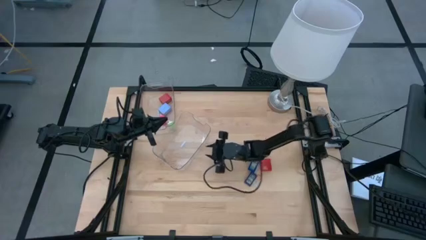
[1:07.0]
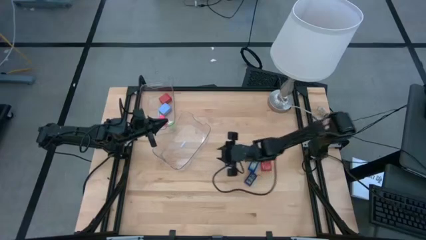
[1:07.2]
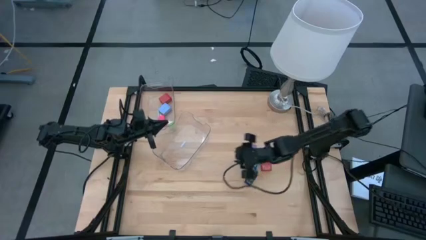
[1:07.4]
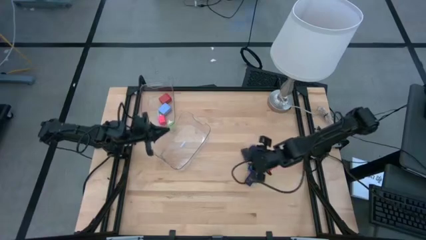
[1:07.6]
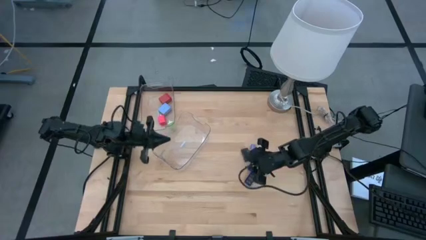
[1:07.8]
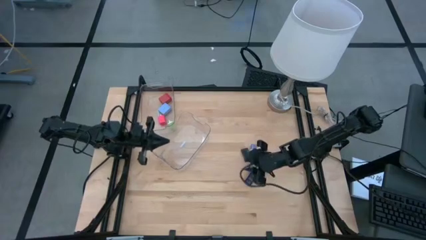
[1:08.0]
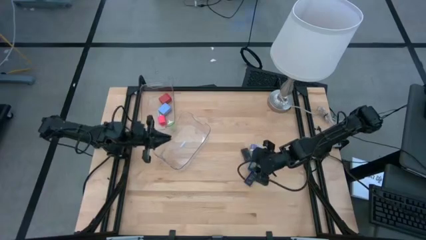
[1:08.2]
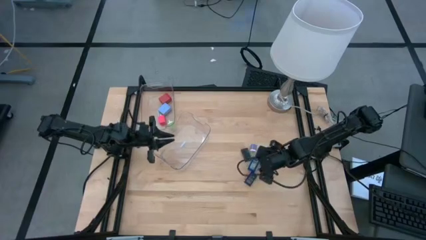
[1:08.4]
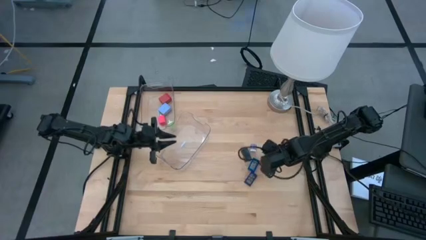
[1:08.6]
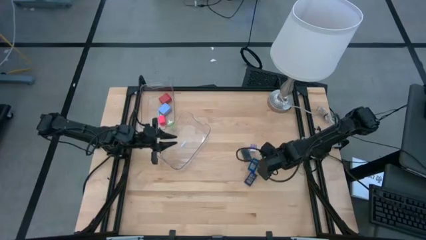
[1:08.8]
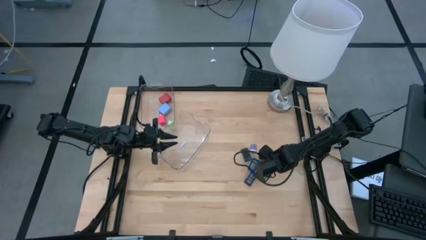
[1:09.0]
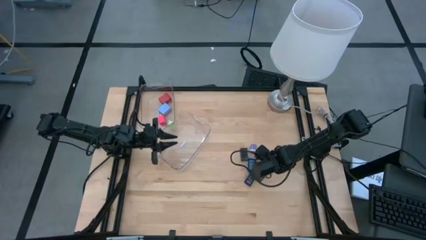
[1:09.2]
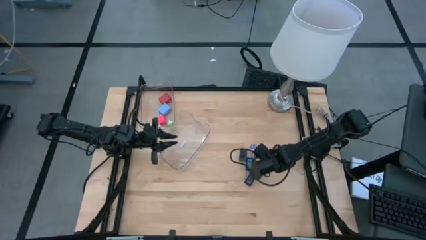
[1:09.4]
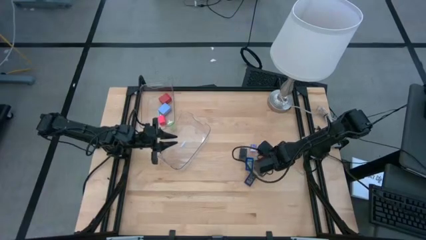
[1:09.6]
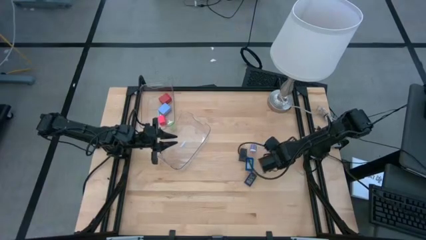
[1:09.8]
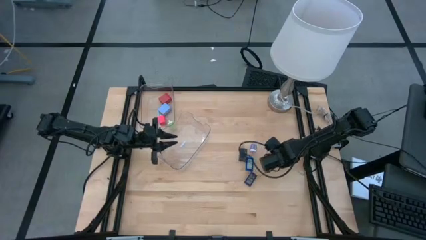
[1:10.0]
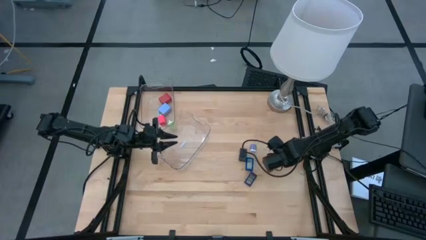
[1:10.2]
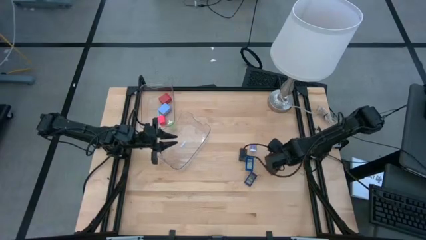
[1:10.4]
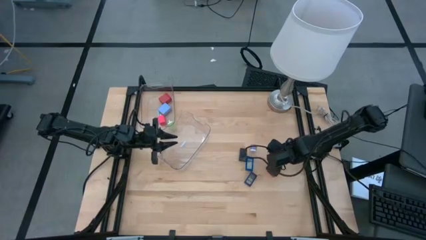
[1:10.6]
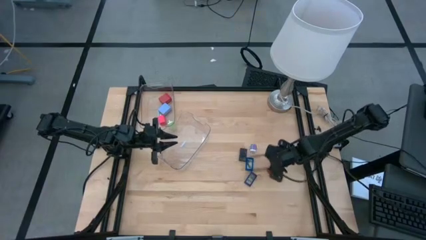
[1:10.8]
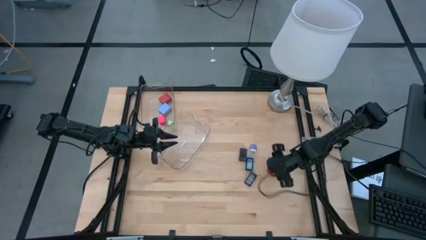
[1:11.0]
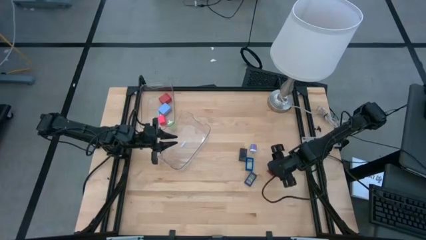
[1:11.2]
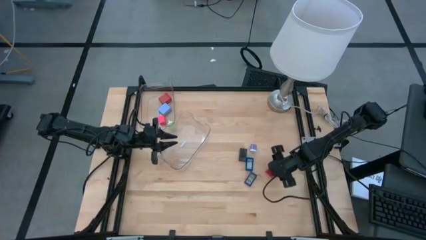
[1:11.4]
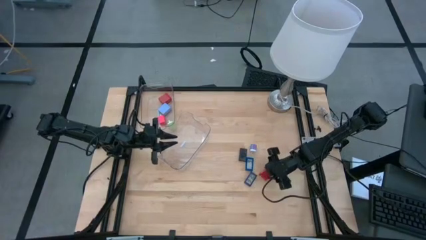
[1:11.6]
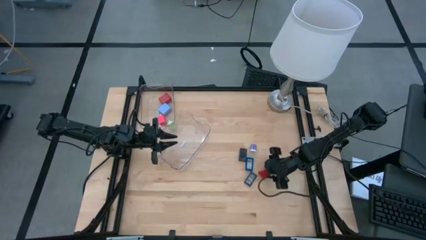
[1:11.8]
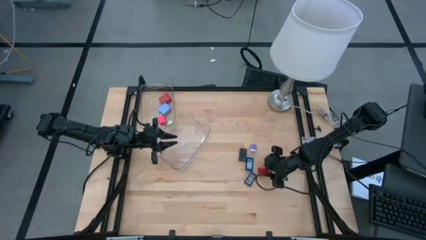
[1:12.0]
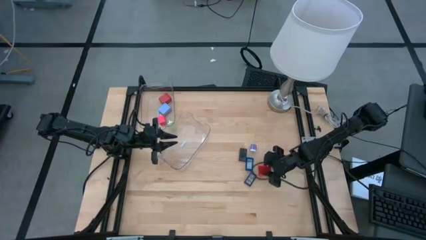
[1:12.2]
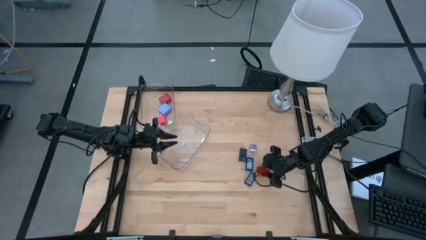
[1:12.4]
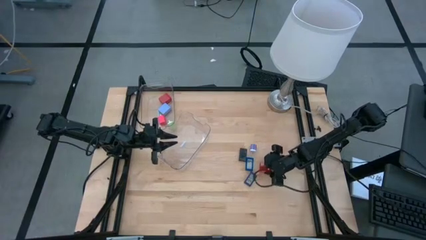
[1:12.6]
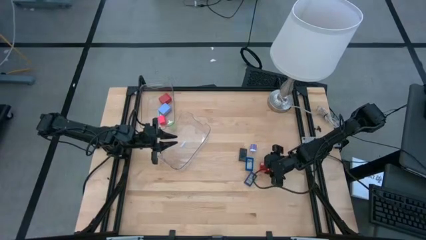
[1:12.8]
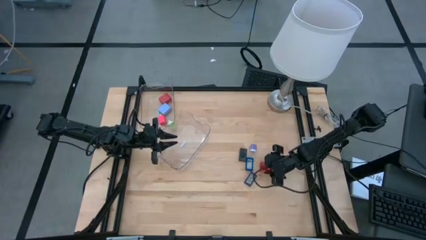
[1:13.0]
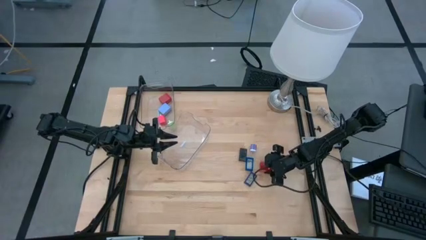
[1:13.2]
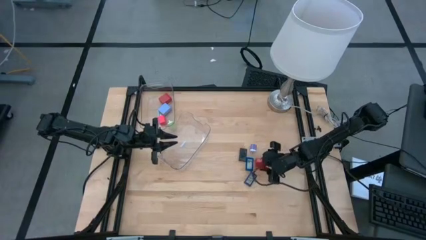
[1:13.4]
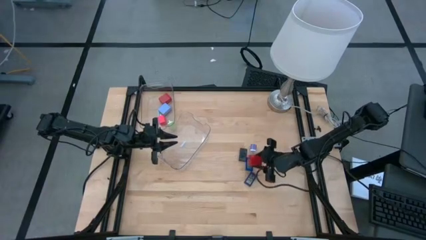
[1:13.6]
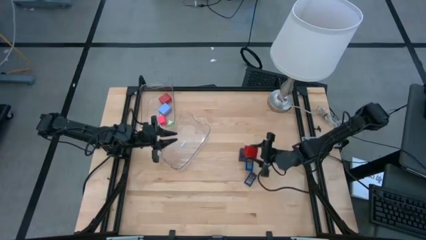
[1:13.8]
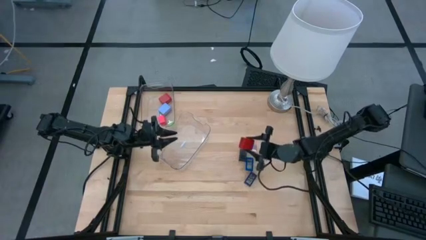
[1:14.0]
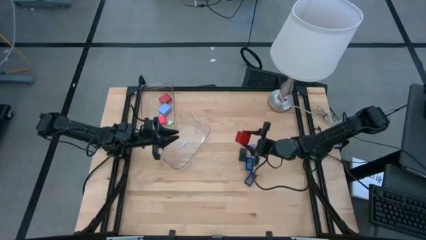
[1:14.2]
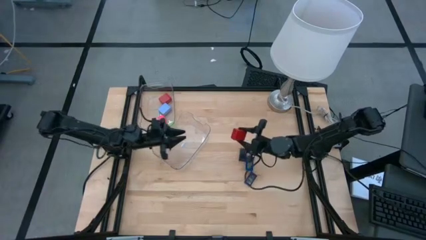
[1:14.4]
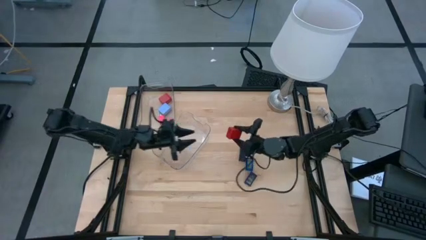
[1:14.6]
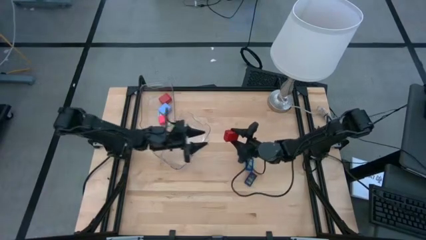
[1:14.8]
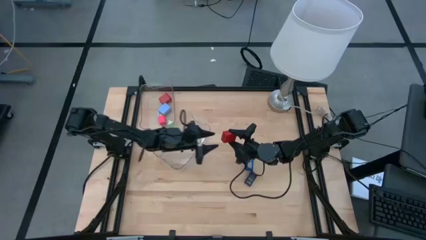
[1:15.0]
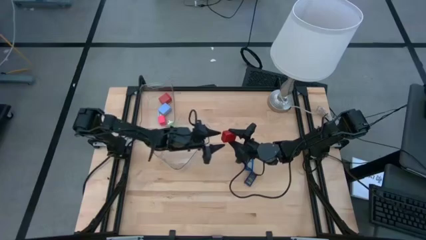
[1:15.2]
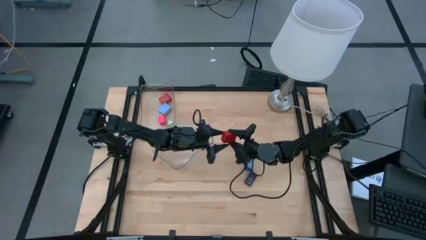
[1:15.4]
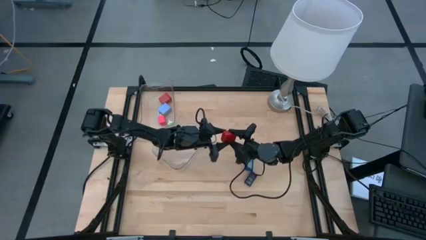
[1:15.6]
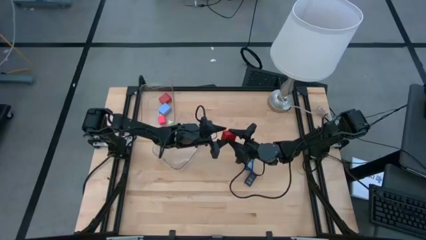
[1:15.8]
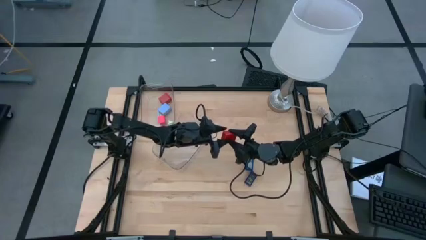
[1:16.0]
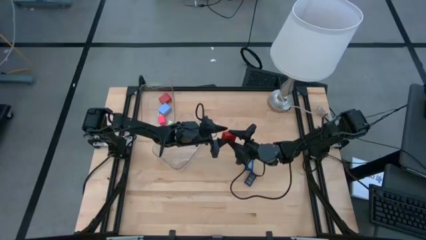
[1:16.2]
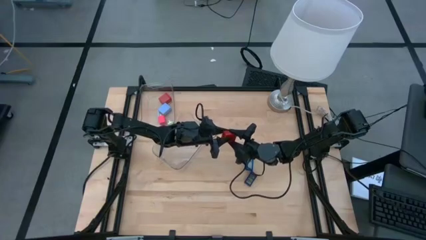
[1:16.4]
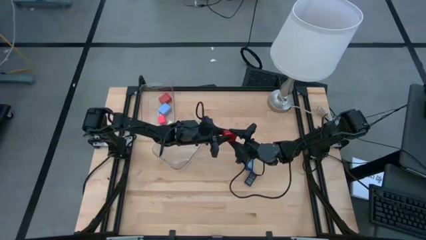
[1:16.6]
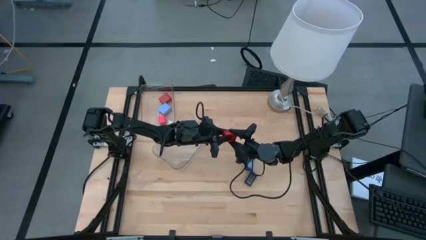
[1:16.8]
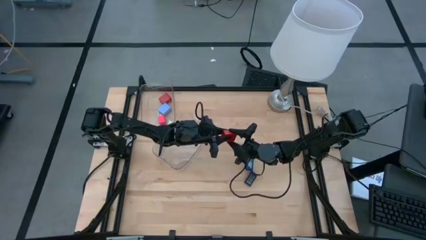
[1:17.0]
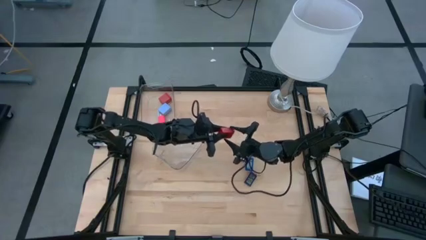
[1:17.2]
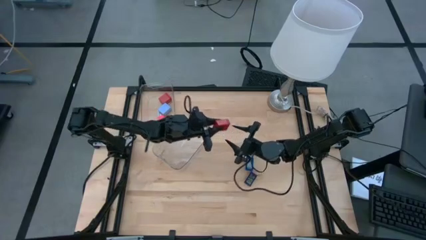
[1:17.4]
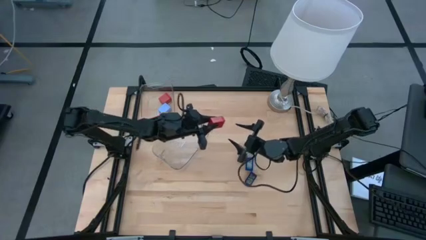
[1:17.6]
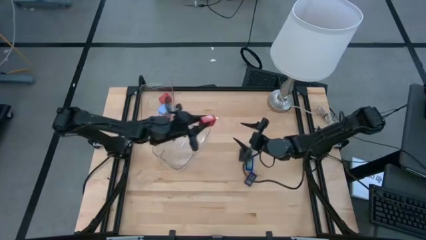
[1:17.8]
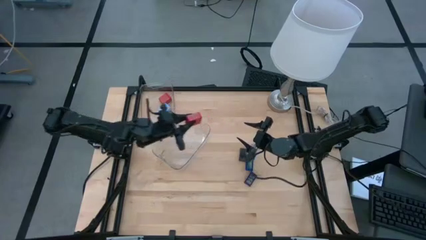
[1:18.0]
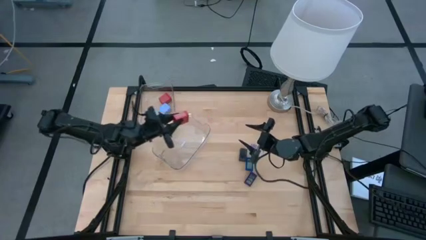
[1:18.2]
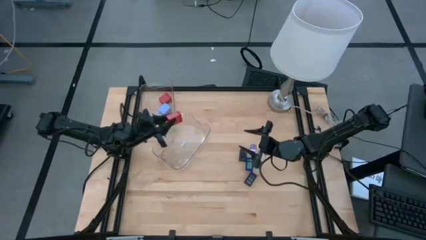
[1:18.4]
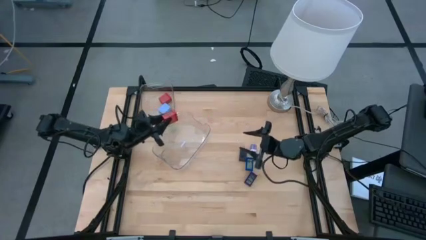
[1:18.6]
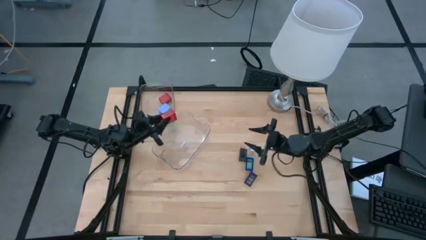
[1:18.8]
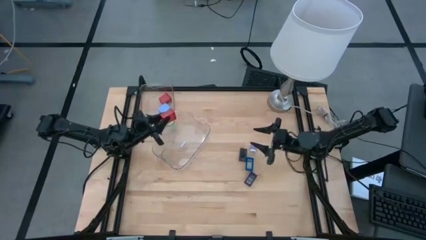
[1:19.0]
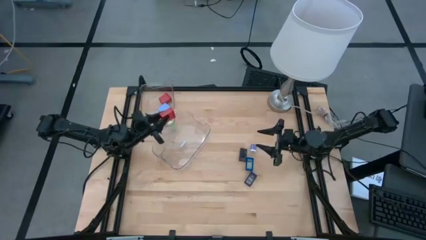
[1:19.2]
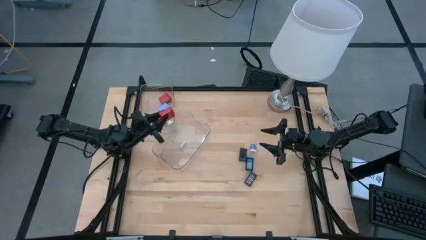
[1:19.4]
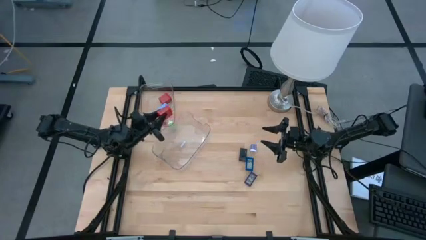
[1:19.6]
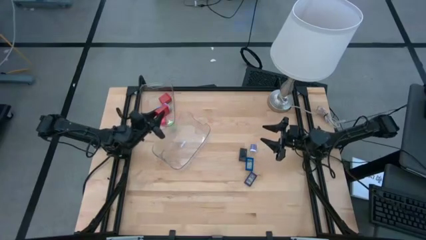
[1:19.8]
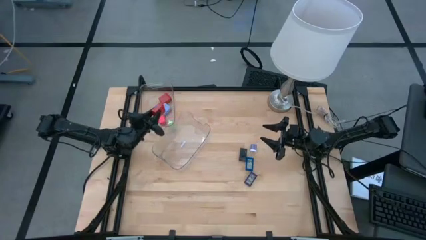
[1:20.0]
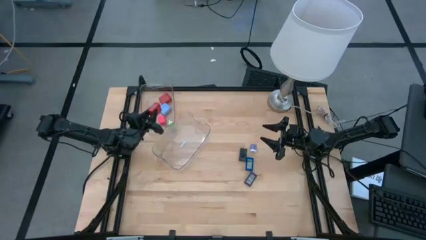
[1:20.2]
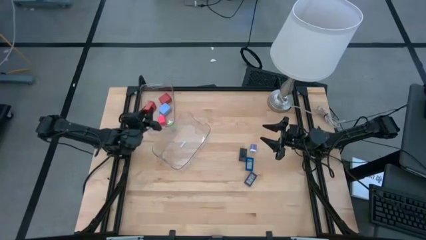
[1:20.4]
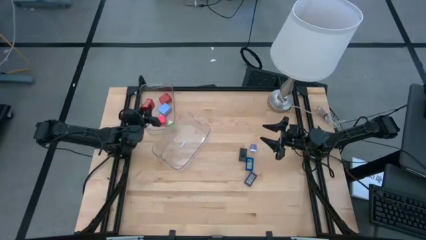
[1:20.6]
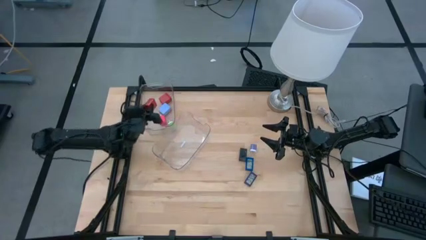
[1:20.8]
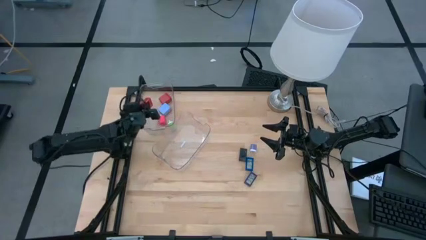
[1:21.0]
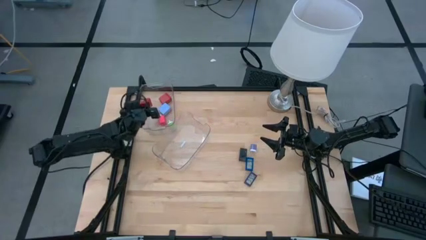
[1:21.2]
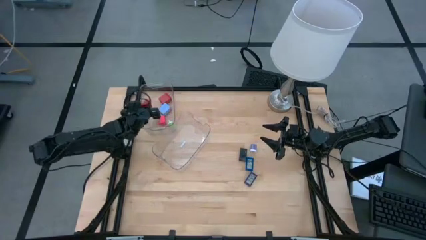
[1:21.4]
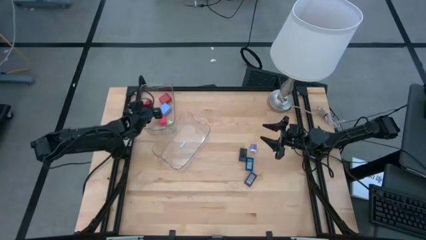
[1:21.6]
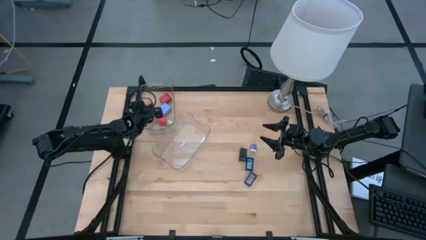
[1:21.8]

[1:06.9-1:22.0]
Task: Pick & Place Office items
Put the red charger adapter into the top transparent bin

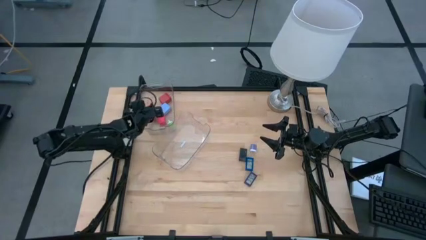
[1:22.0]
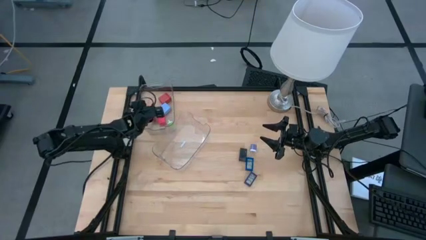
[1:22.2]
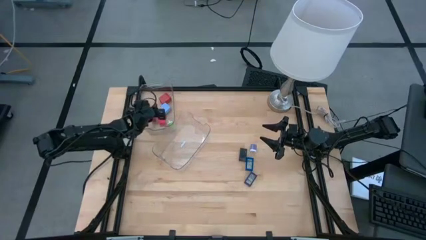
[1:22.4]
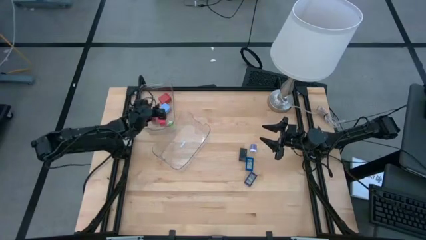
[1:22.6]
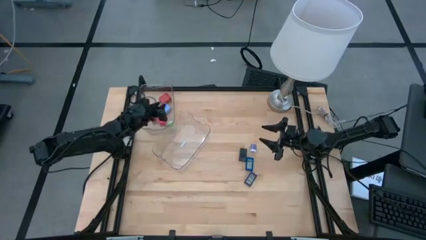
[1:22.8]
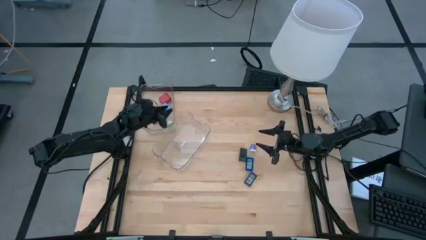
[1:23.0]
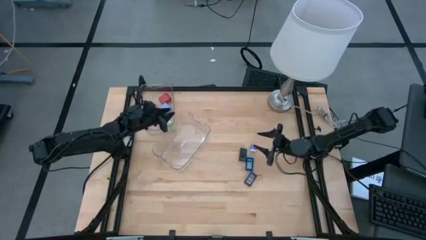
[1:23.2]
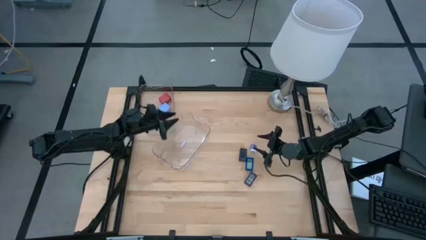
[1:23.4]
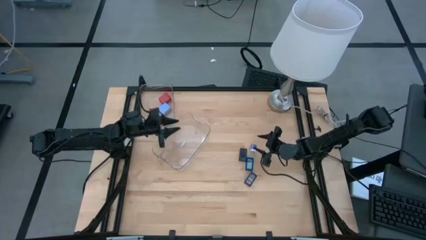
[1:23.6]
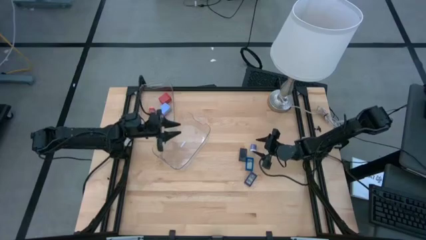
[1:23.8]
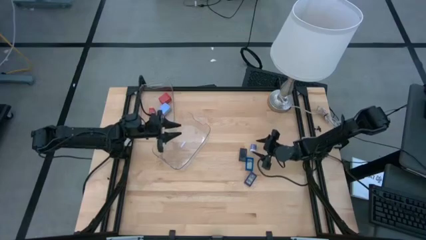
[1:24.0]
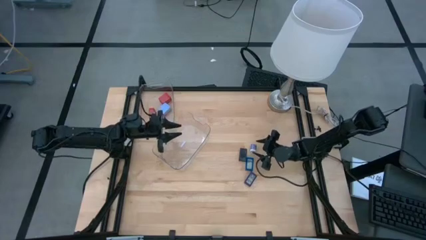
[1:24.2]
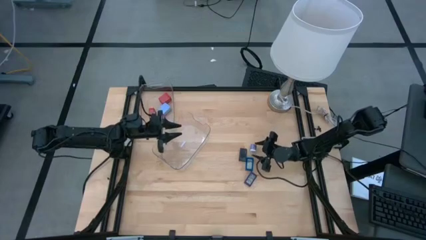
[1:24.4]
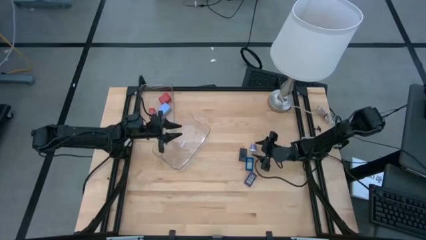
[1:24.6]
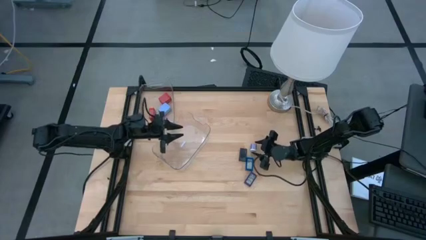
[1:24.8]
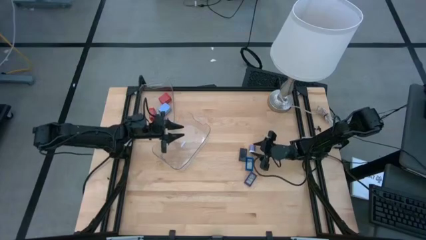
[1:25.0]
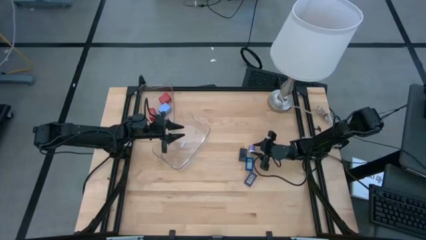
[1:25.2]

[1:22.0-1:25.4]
Put the blue charger adapter into the top transparent bin
